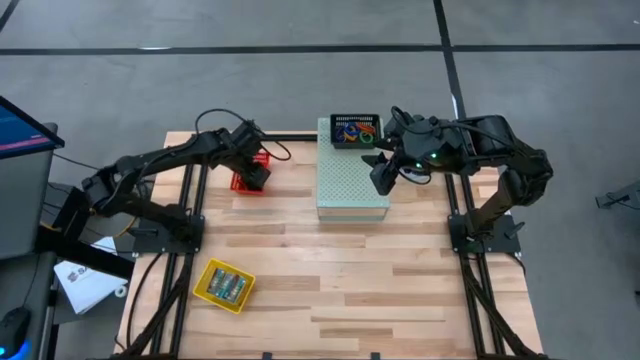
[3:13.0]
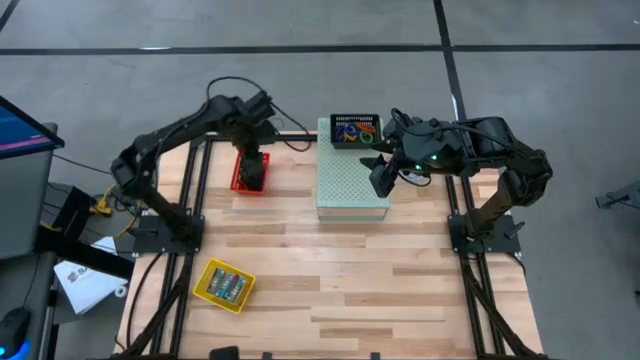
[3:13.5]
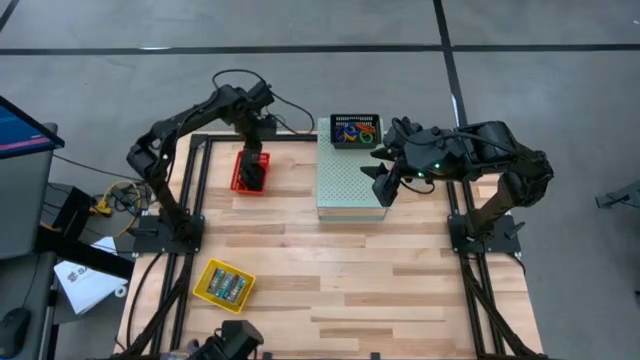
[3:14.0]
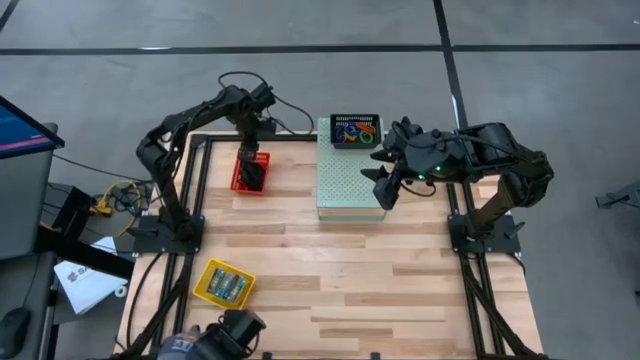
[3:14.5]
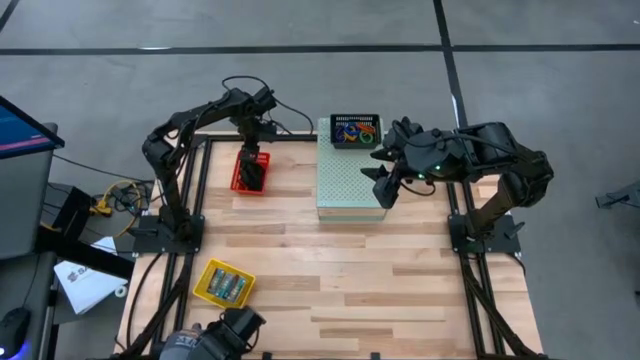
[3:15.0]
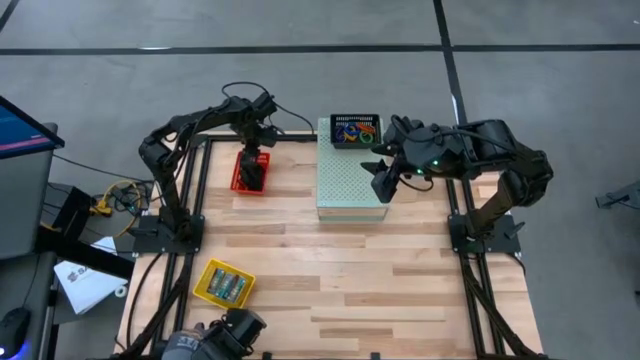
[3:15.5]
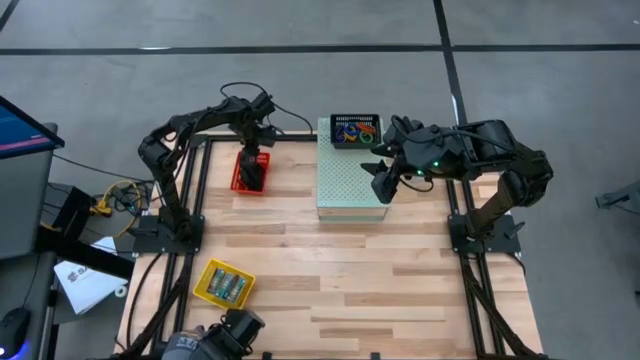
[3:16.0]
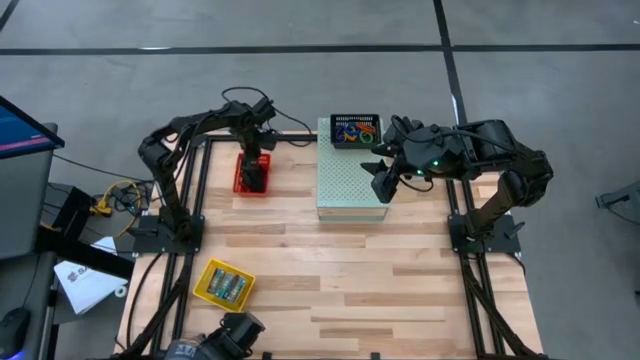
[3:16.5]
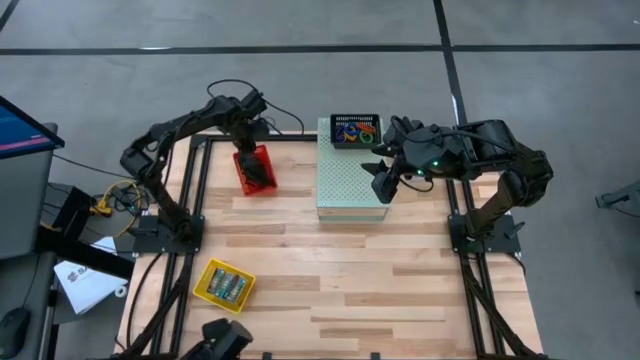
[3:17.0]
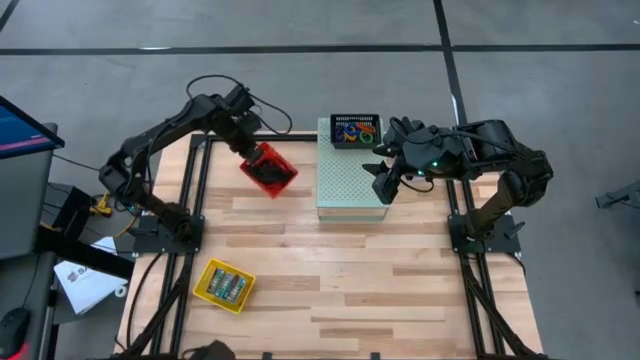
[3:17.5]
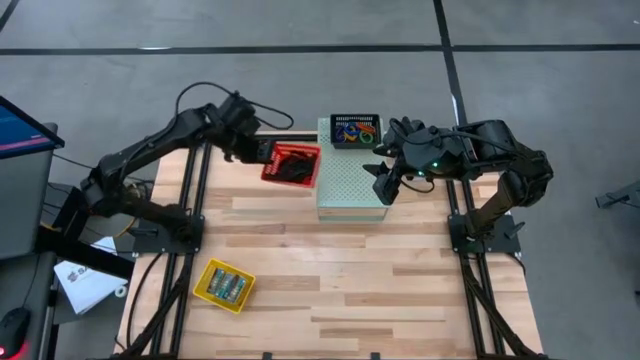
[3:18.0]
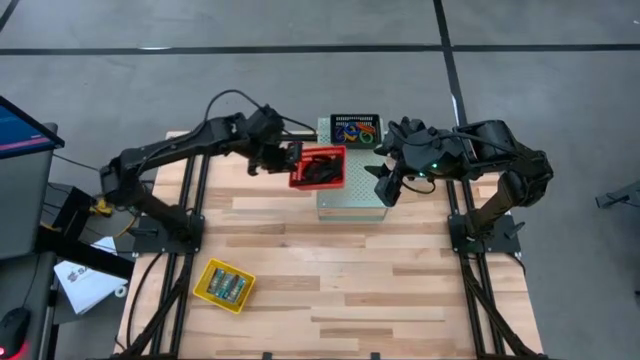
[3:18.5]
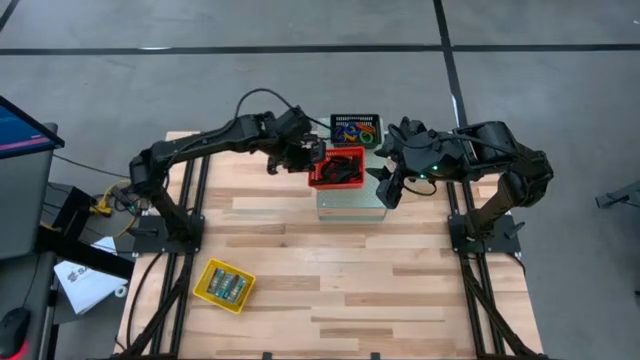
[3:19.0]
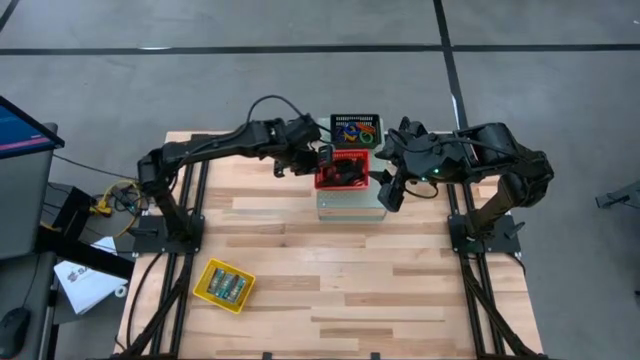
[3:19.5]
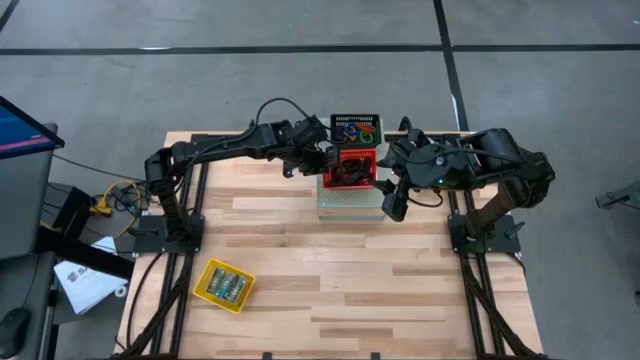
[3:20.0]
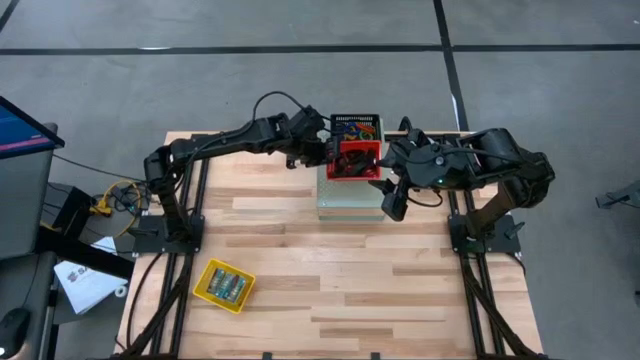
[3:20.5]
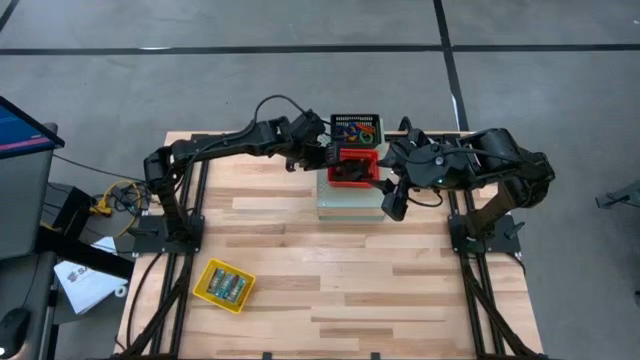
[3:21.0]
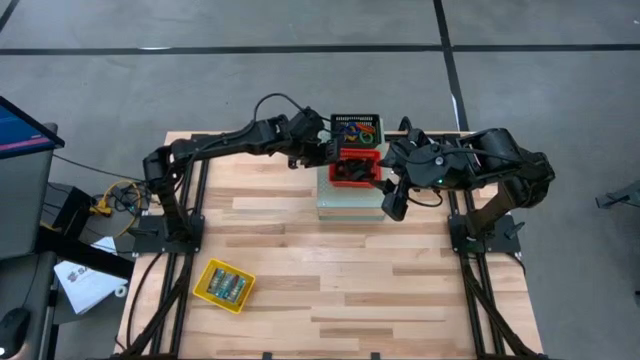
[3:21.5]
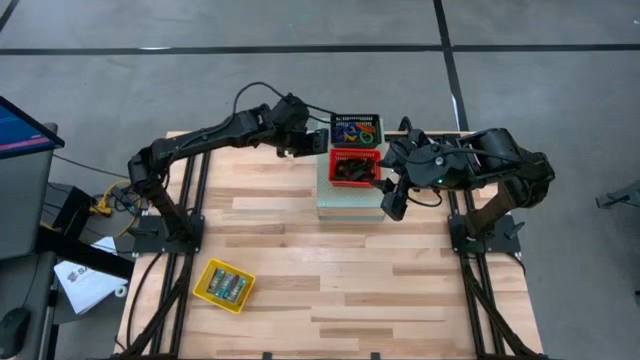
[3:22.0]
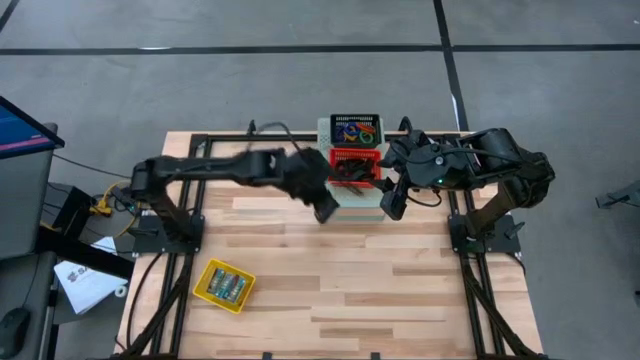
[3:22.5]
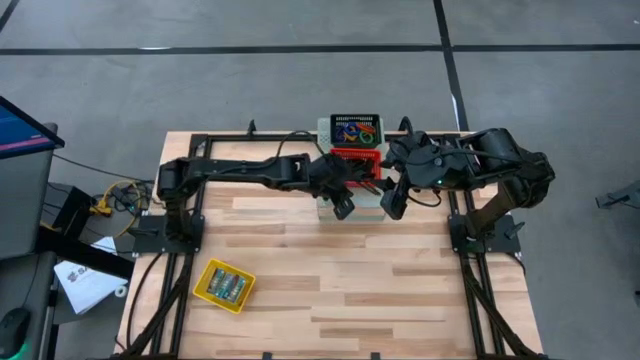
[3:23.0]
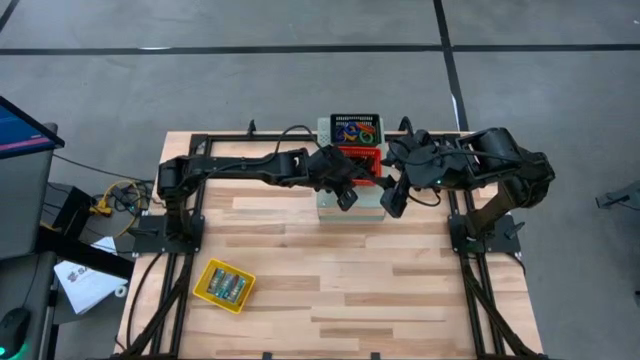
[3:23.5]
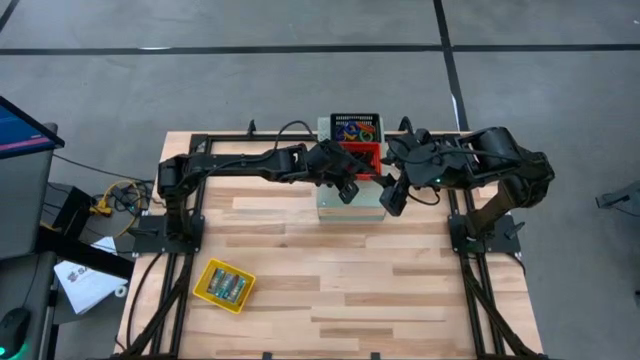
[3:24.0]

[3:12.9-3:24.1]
Task: Pick & Place Office Desk Supplies
Put the red bin on the shelf

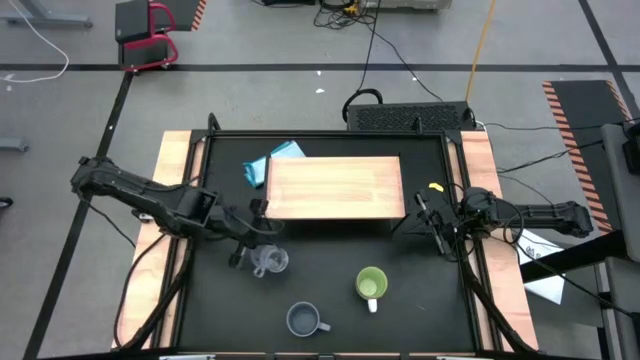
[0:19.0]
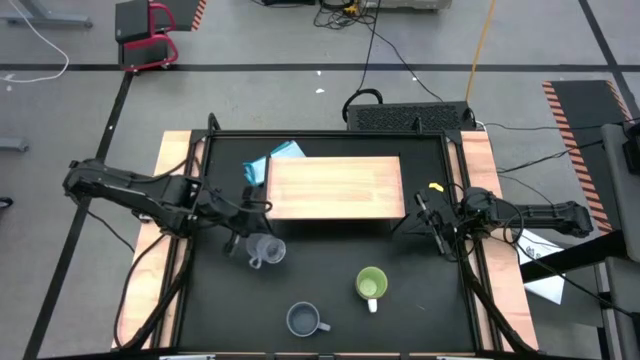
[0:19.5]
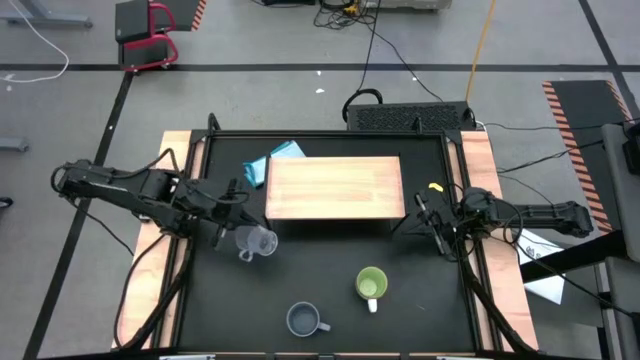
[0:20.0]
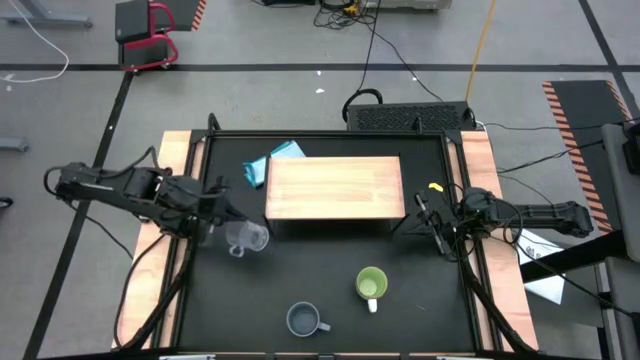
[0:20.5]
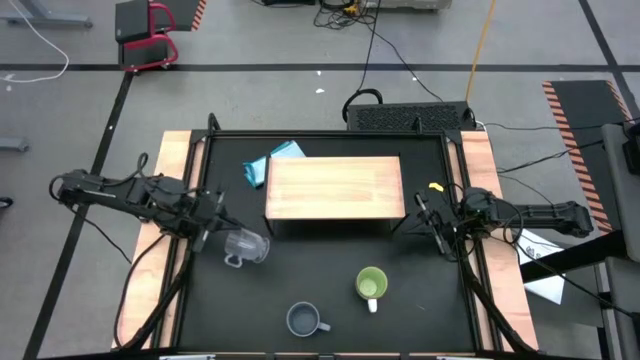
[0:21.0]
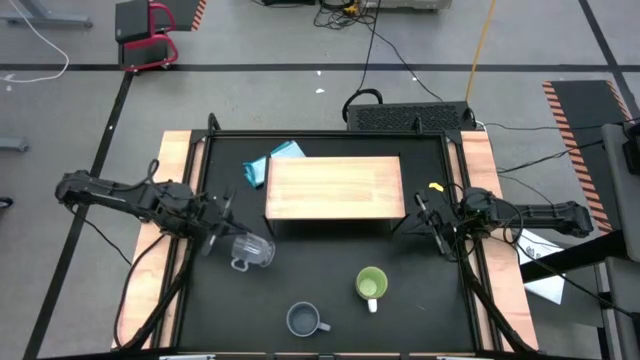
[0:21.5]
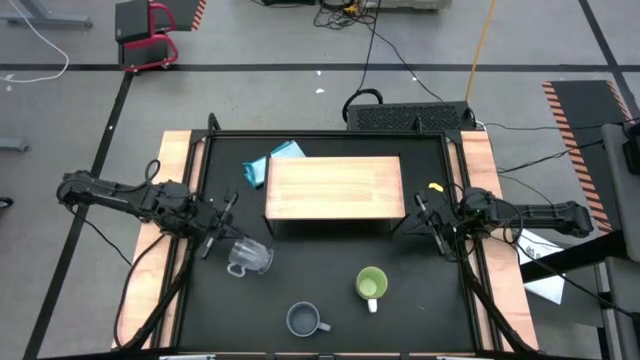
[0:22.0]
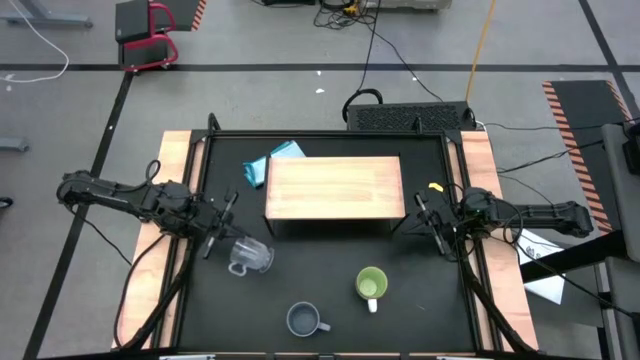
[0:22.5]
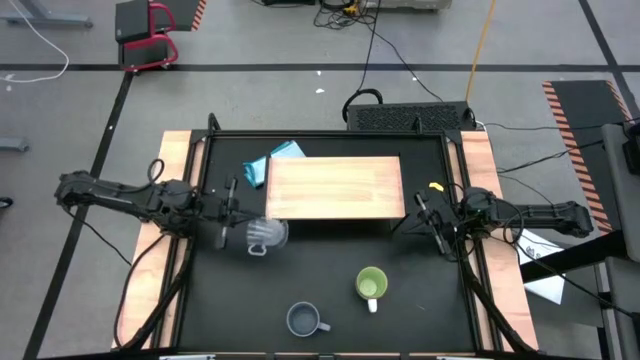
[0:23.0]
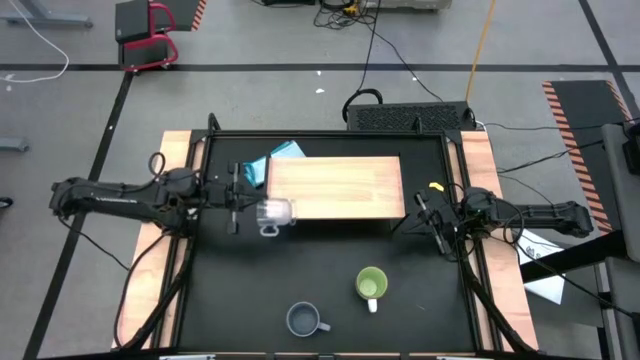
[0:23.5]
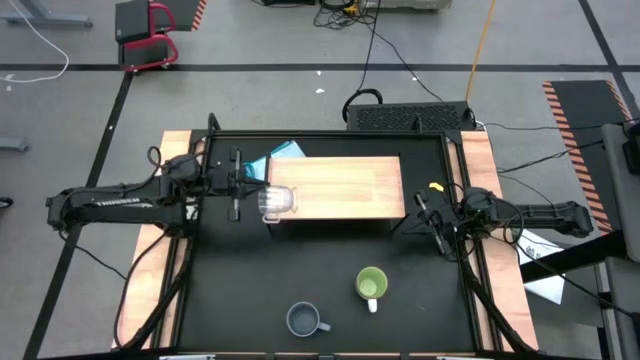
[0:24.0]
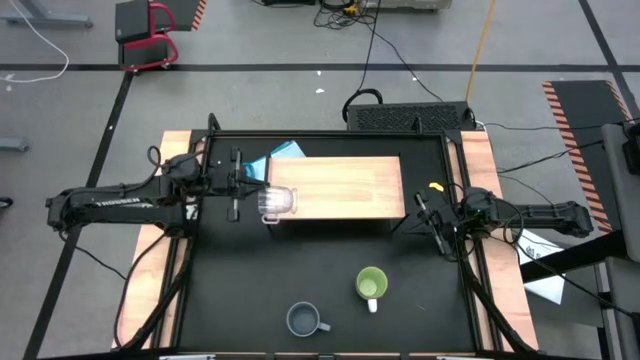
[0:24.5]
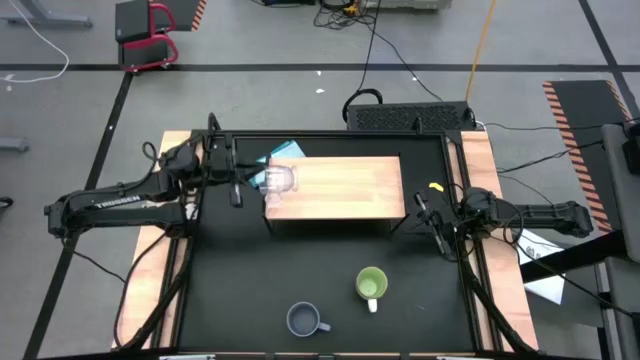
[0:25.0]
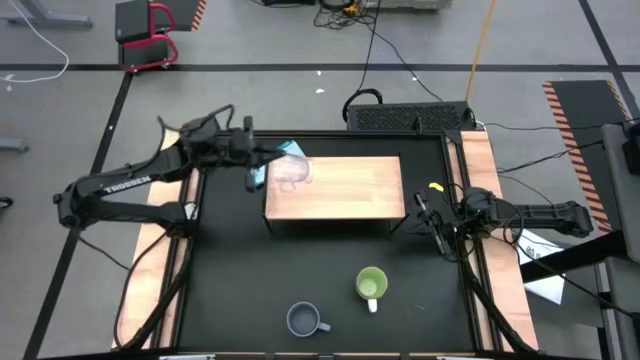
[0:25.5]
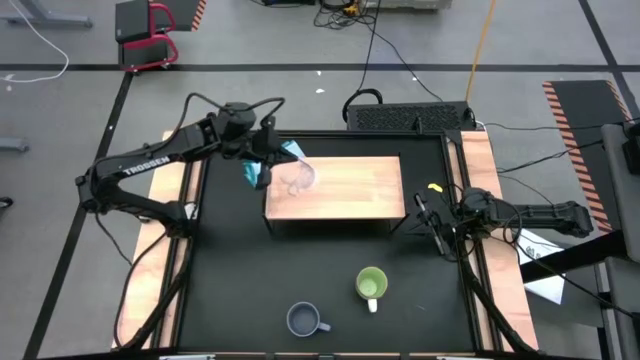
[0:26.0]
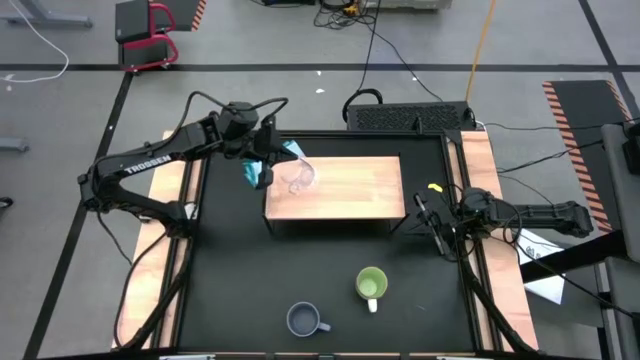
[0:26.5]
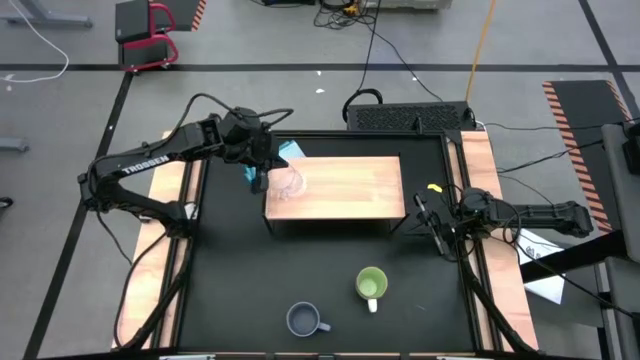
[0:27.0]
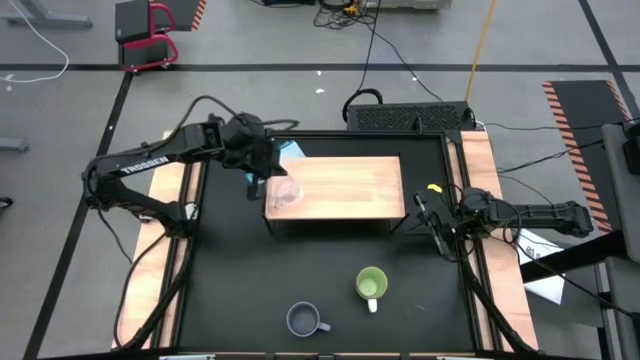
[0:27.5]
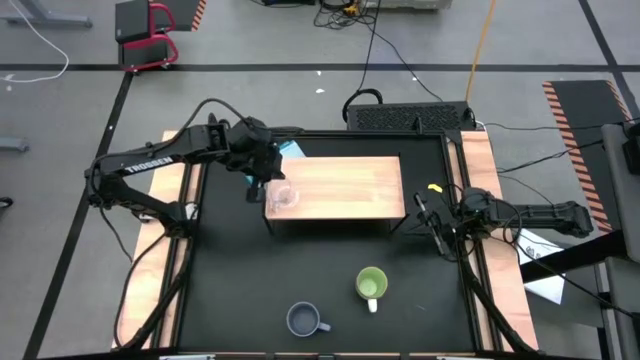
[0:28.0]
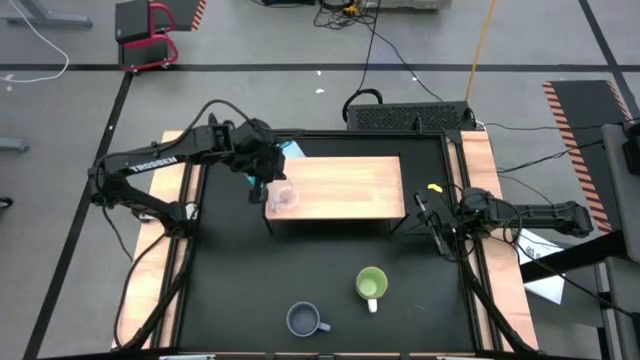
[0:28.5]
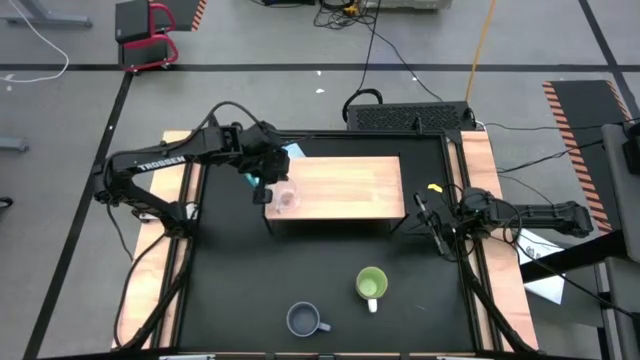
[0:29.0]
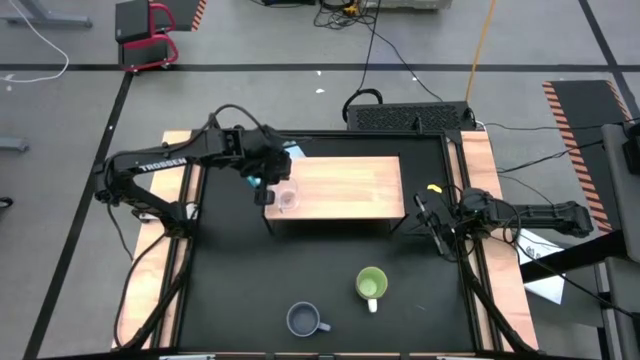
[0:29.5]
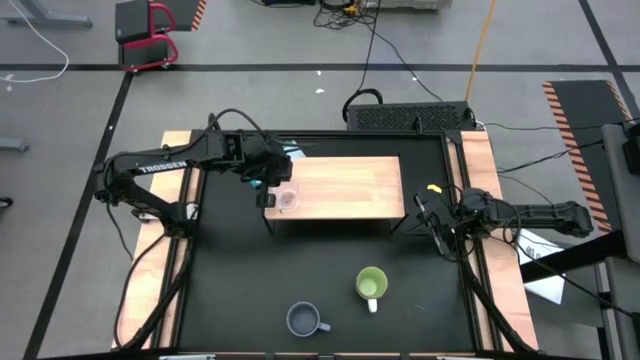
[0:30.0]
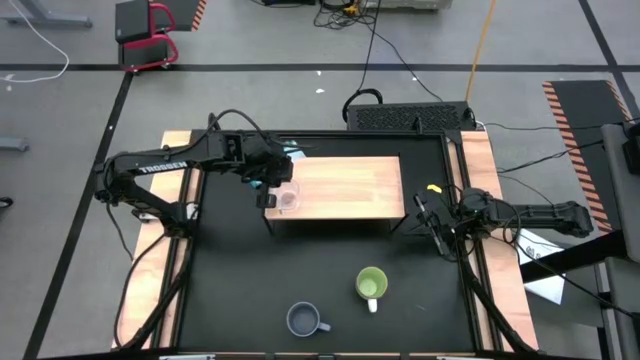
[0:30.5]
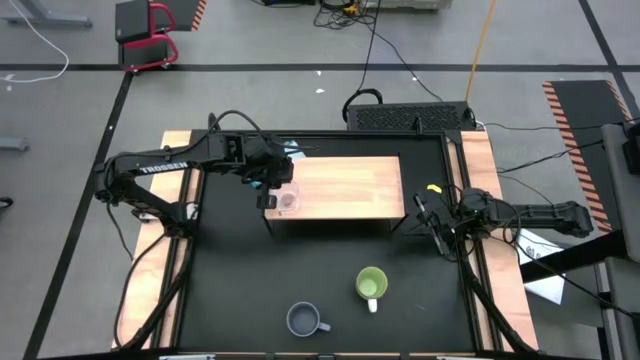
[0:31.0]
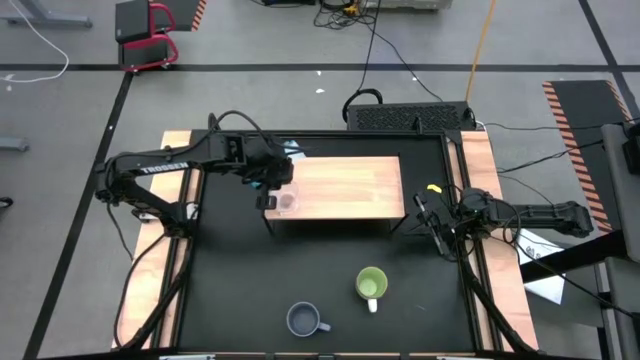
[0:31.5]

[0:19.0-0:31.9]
Task: Stack small to large cups/mugs on shelf
Put the transparent mug on the shelf
